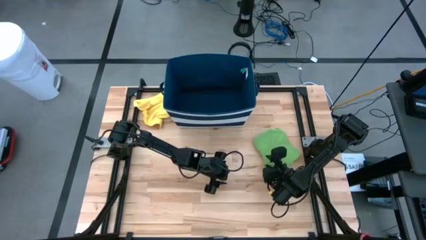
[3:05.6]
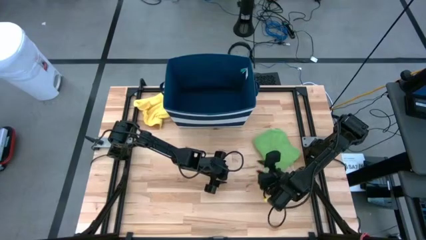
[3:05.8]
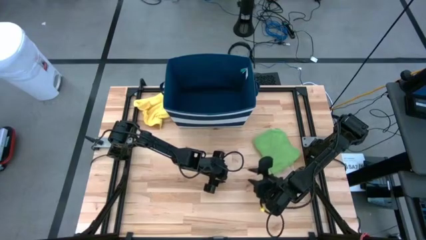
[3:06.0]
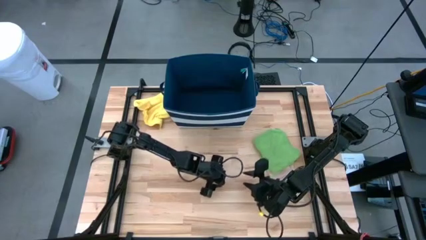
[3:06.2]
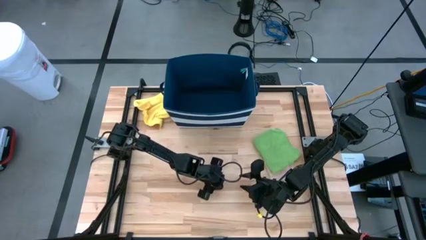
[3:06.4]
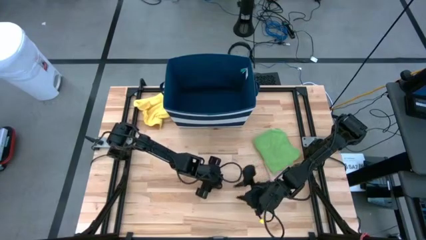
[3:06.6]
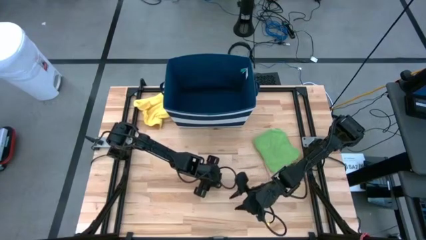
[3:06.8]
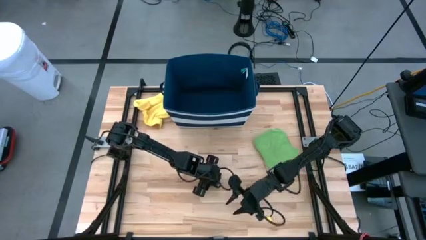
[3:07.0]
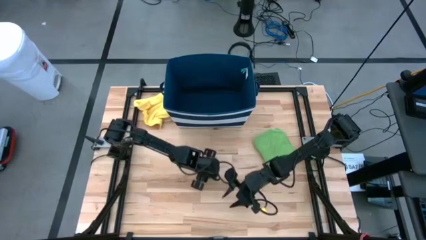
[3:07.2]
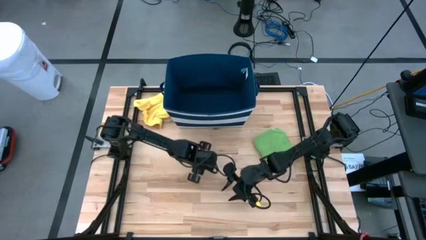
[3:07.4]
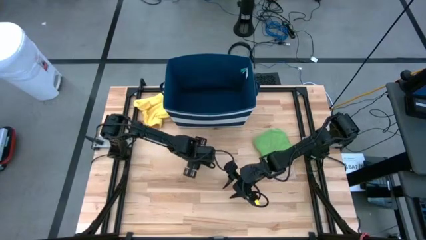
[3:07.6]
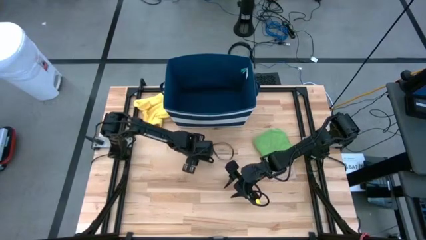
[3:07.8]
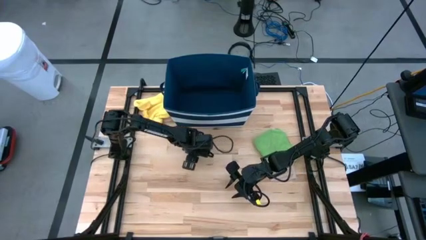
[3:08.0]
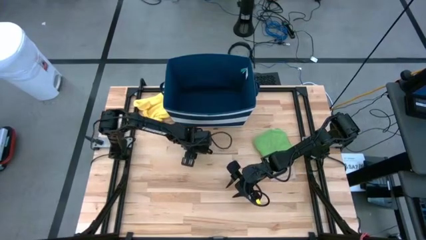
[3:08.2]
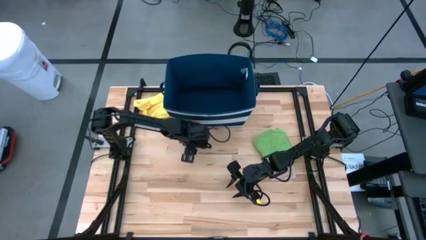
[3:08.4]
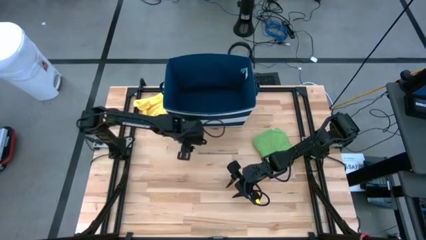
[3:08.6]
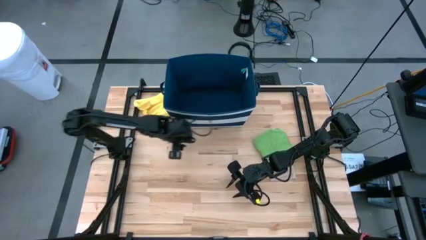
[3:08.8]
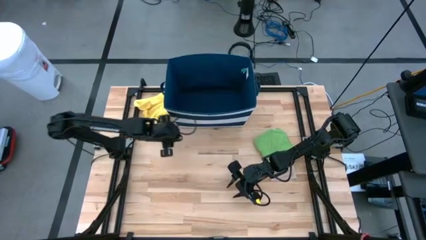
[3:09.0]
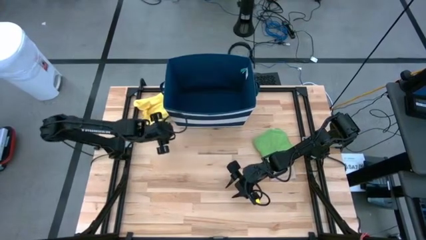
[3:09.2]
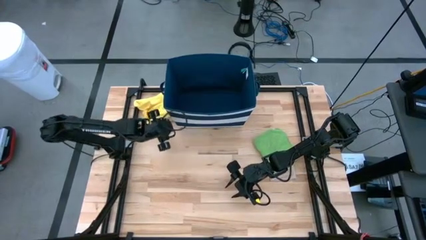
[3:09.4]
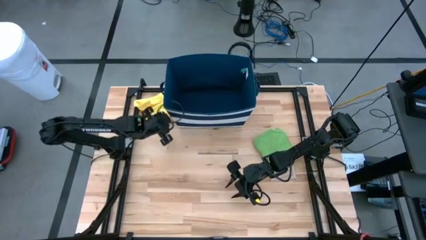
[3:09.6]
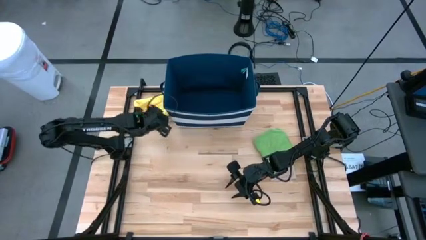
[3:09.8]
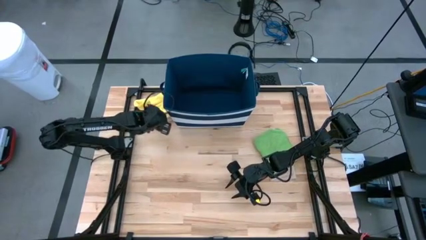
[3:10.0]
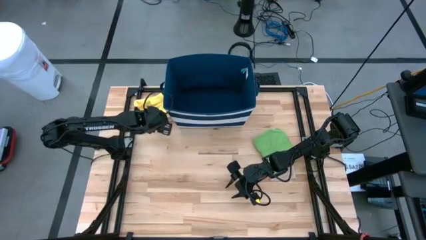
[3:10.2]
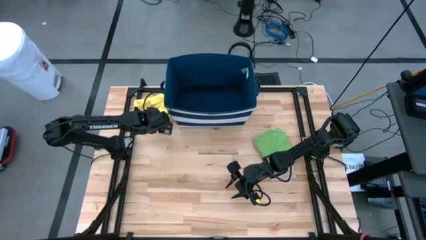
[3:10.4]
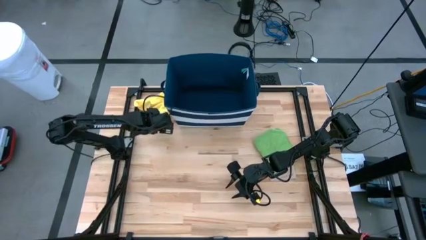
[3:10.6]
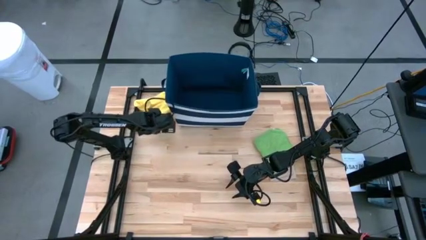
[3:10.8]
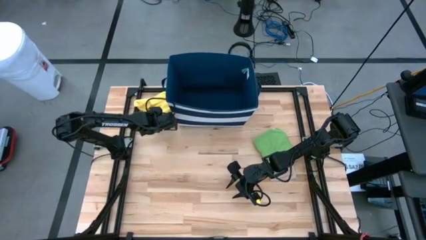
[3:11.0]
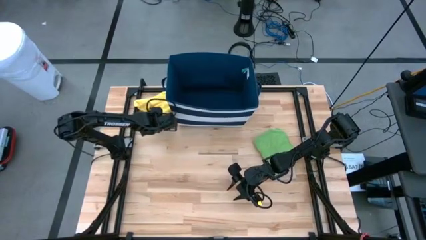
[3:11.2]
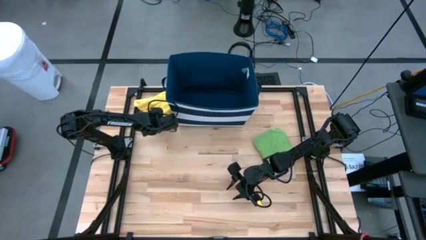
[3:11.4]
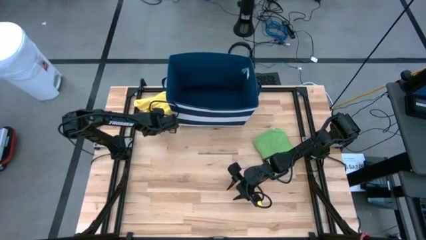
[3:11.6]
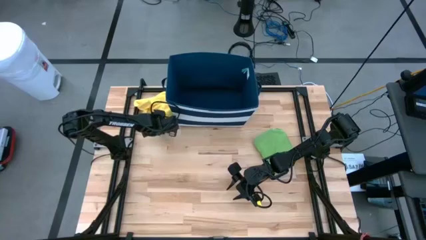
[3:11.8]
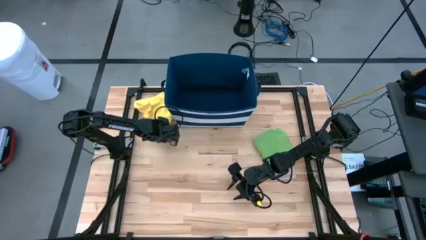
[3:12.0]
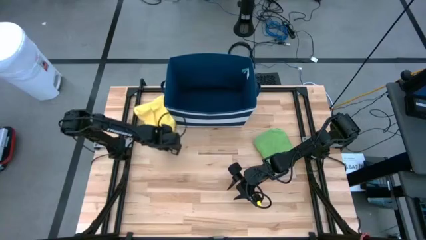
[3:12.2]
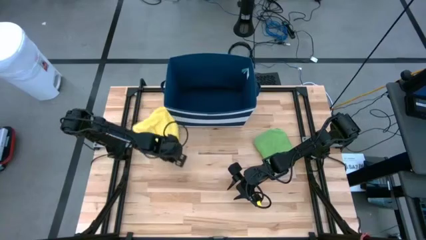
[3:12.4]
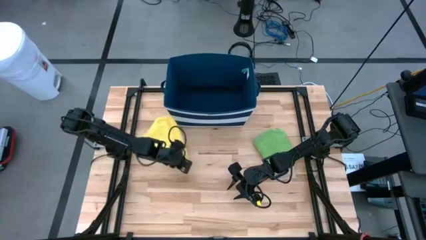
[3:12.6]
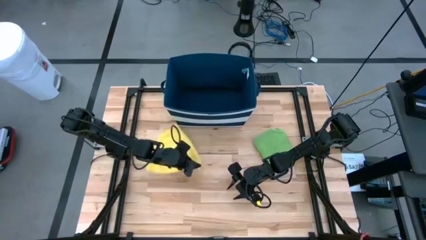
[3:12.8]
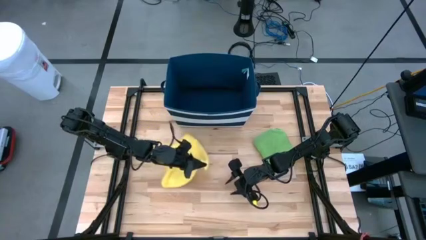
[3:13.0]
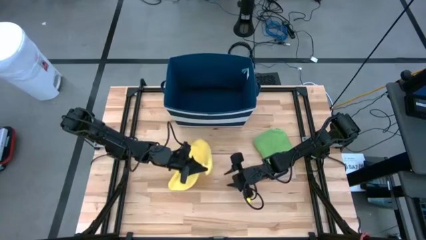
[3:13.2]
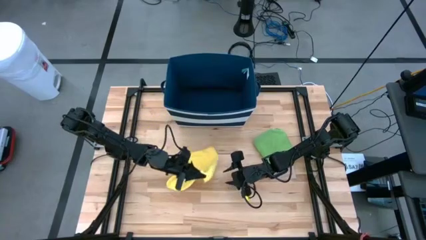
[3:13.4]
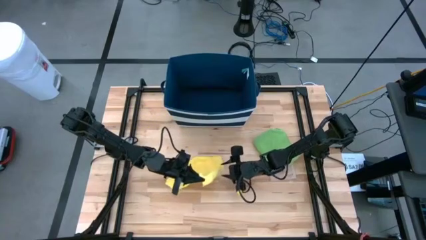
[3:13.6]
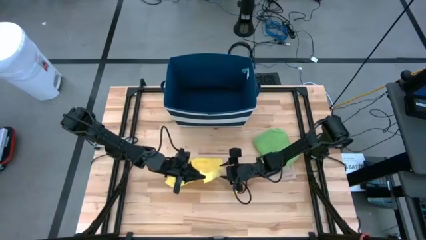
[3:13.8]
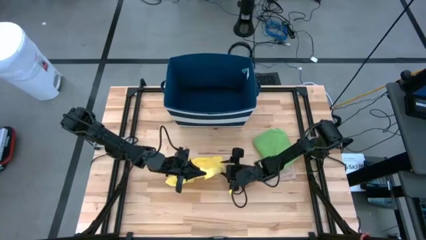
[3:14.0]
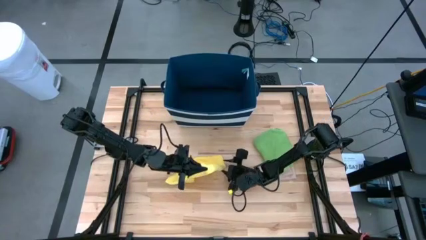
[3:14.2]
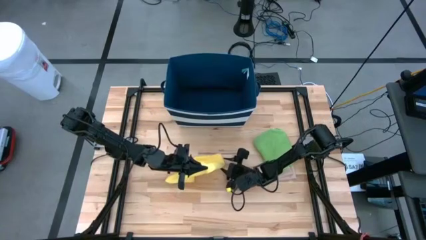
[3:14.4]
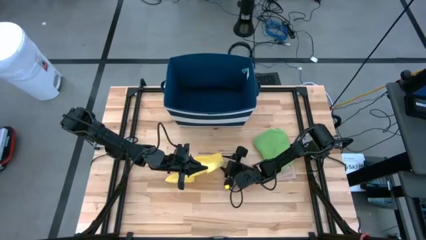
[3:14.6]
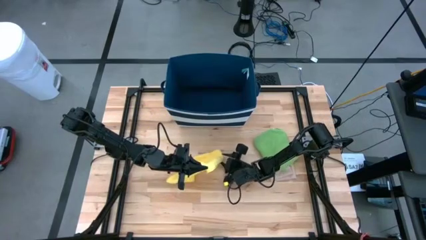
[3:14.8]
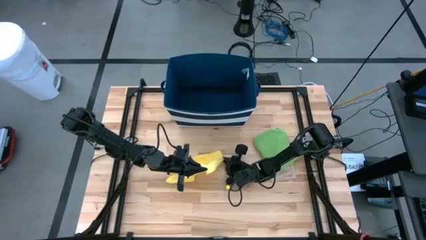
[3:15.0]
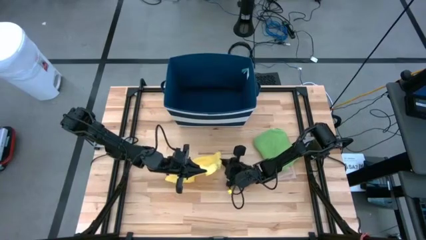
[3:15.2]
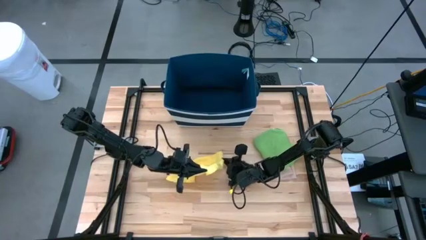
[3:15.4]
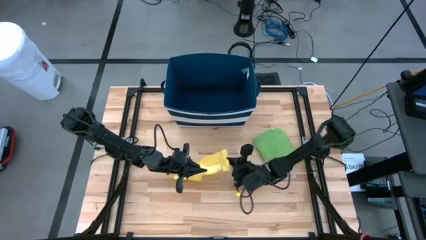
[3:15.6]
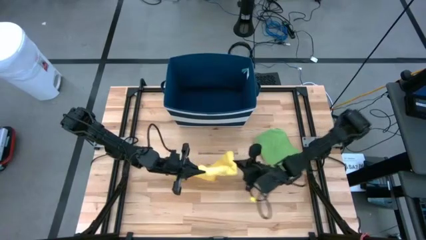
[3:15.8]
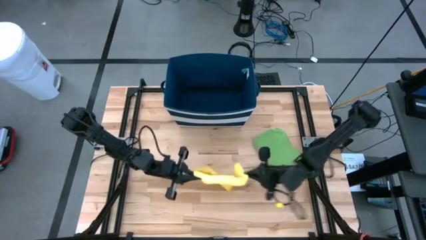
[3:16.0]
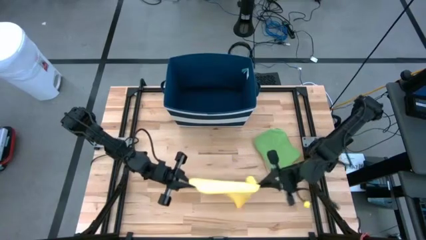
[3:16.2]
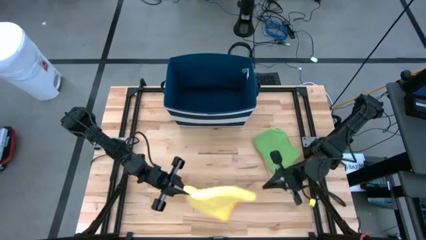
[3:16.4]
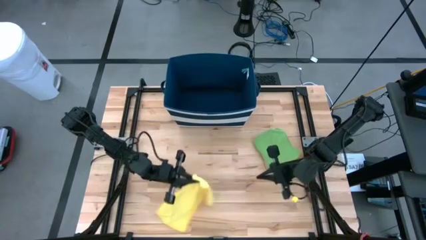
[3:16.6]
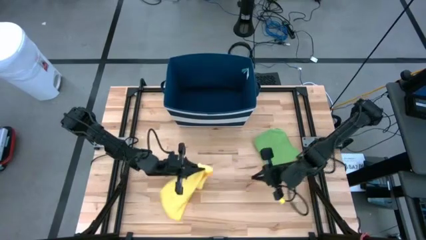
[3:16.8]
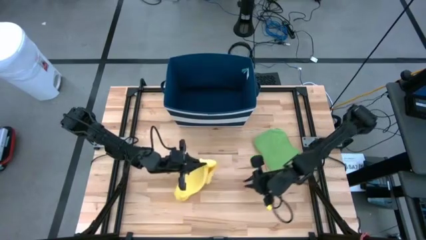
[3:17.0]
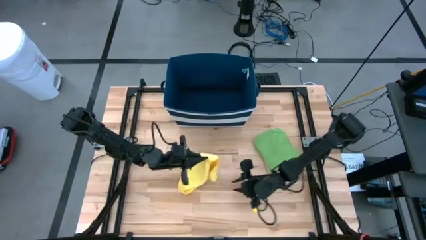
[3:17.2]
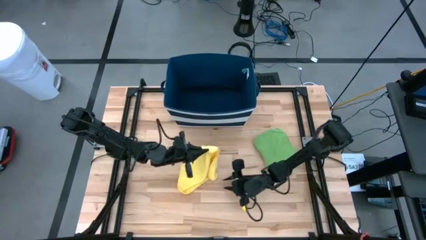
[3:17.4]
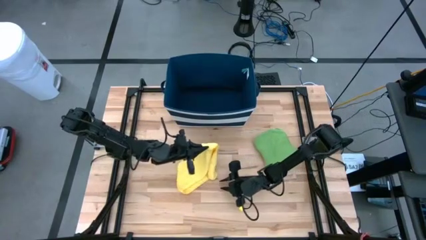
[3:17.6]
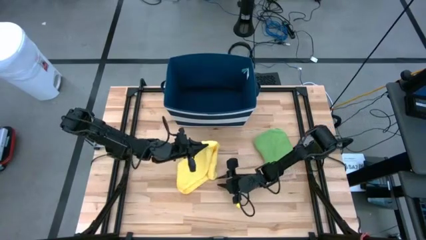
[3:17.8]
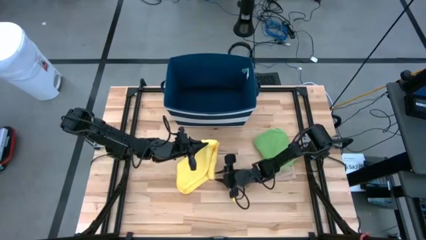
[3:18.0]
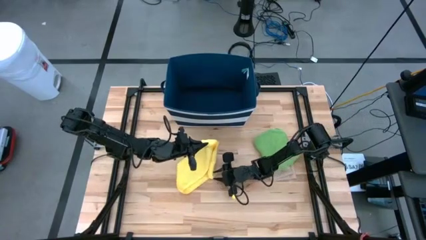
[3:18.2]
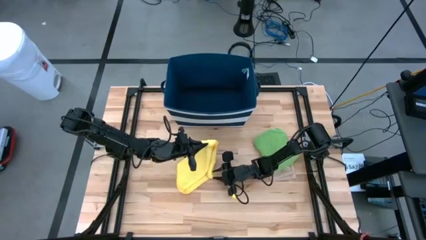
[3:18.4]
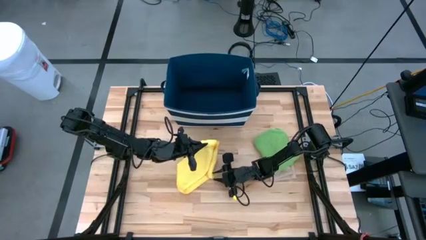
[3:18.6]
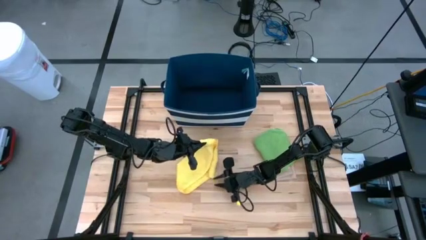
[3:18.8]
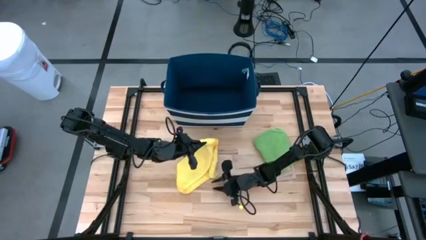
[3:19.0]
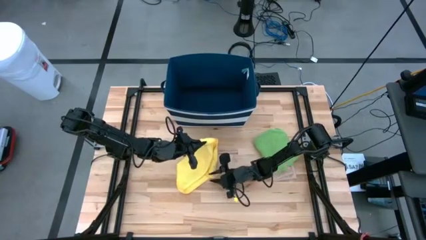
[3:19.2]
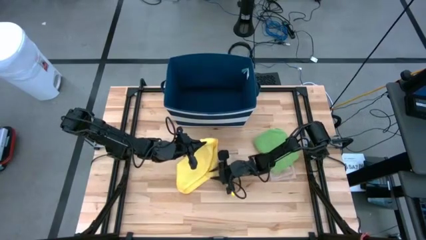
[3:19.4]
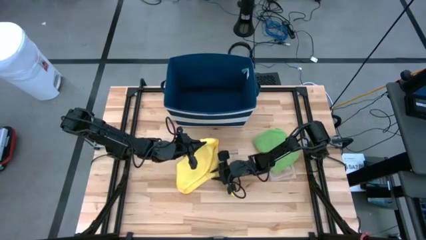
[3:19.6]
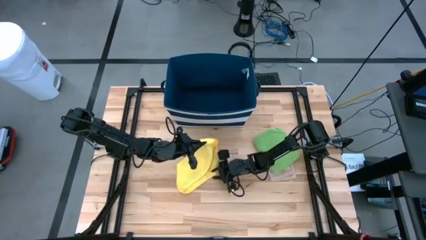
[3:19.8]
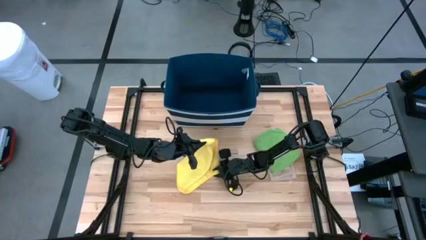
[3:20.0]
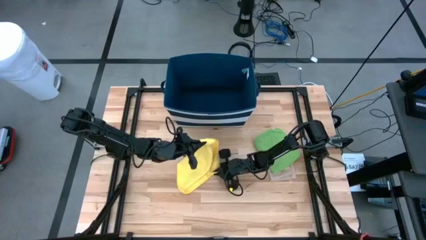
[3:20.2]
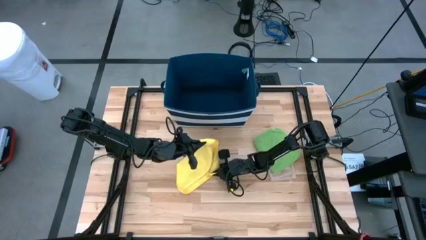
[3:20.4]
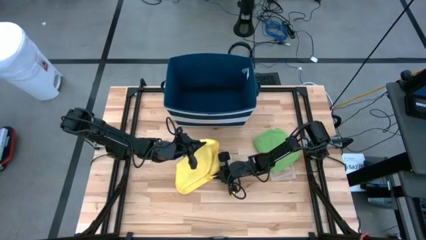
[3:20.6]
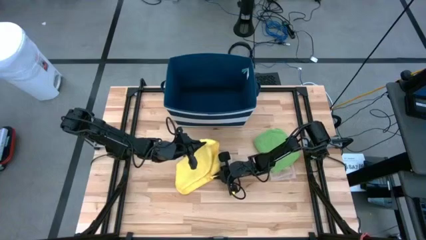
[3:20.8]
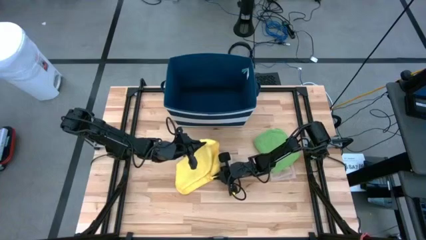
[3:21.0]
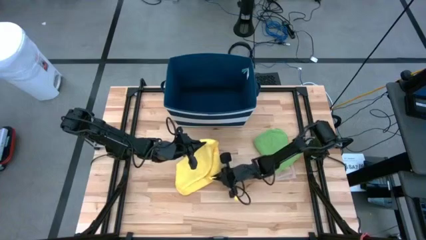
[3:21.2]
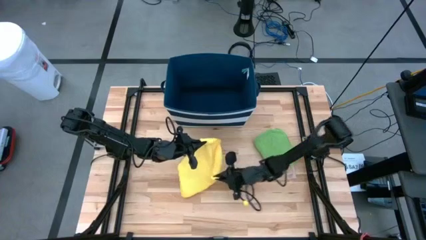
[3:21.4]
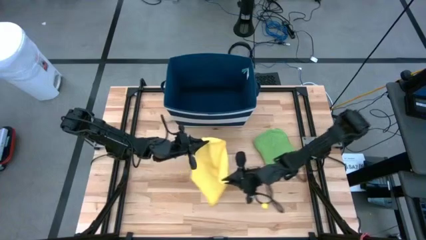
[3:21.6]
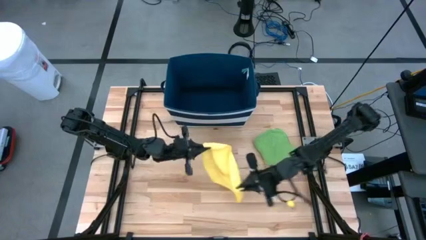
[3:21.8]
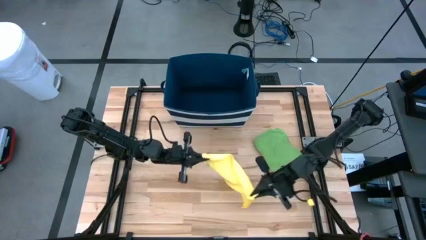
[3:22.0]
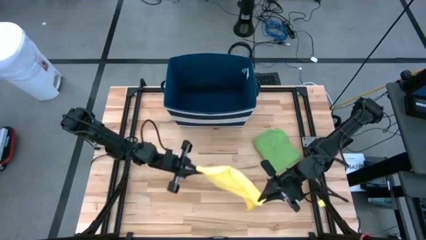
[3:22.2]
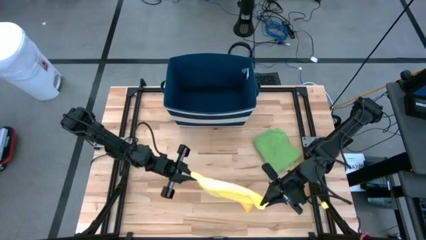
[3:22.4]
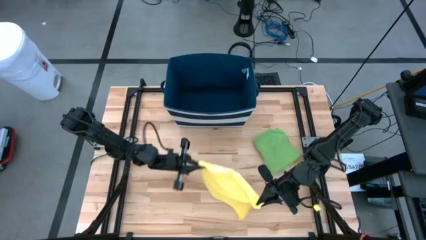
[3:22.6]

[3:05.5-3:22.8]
Task: Fold towel
Fold the yellow towel
